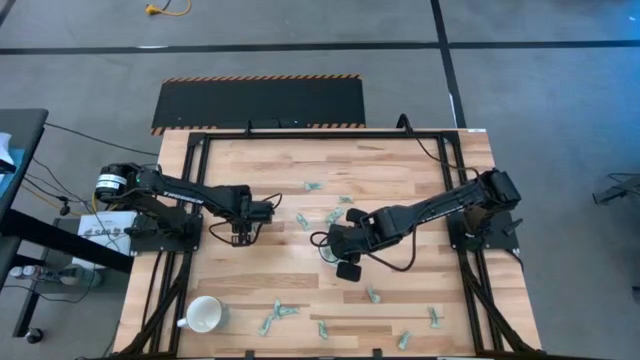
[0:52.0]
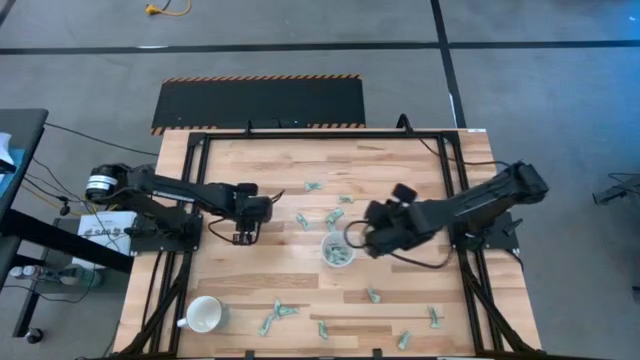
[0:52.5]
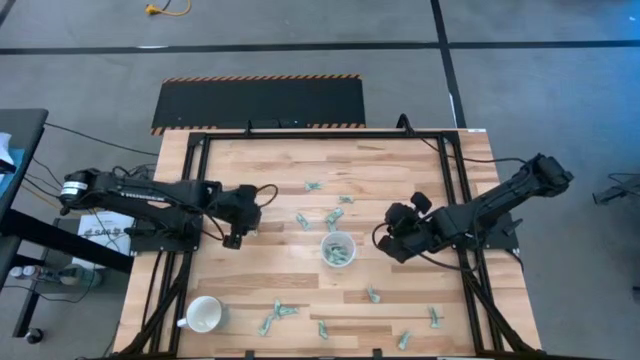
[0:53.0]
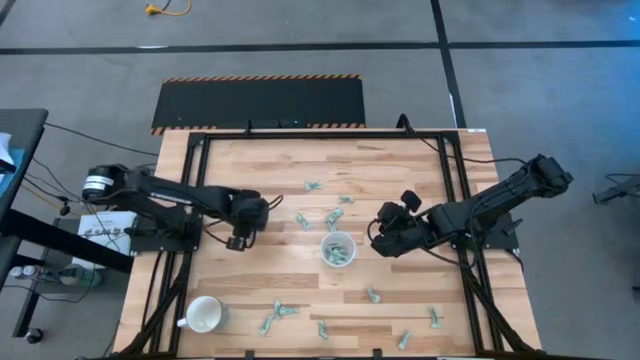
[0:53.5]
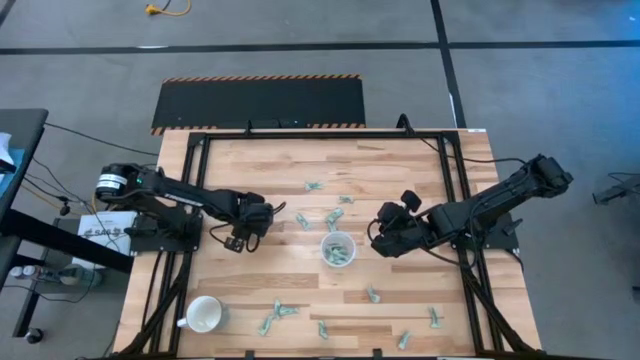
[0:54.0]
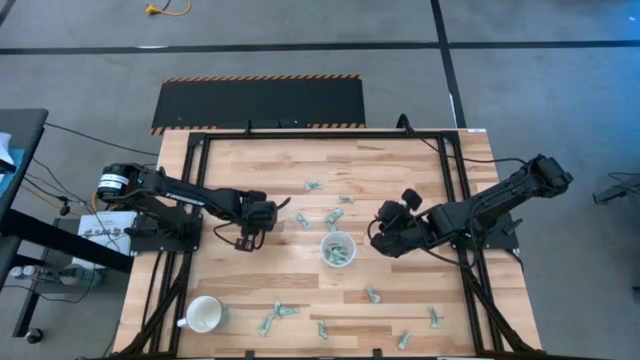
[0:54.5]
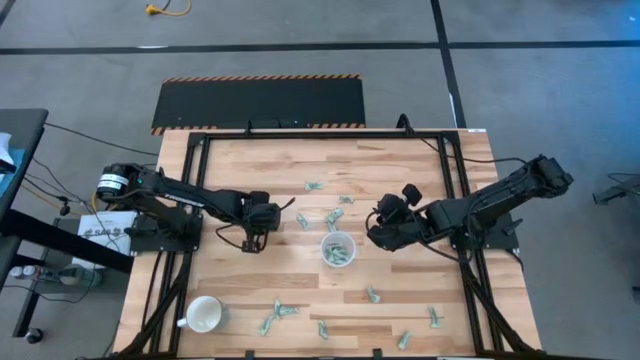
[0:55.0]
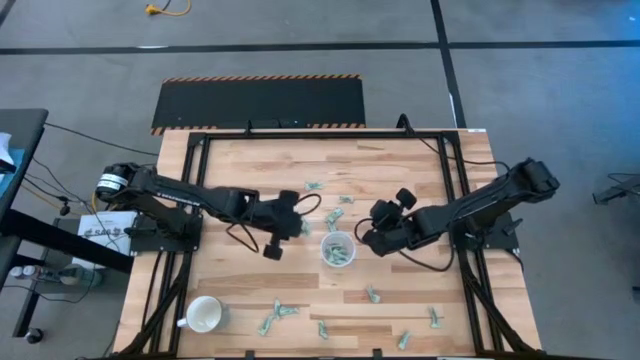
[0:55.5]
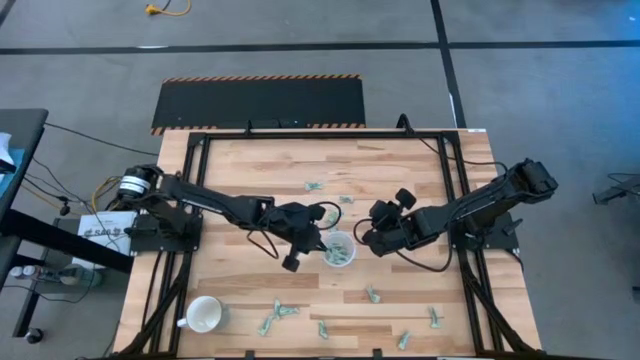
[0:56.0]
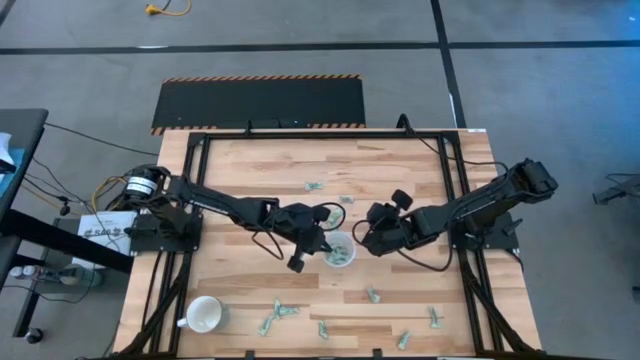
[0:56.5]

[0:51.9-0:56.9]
Task: Pick and place Stevia / Truvia into bins
Put the stevia packet into the transparent container

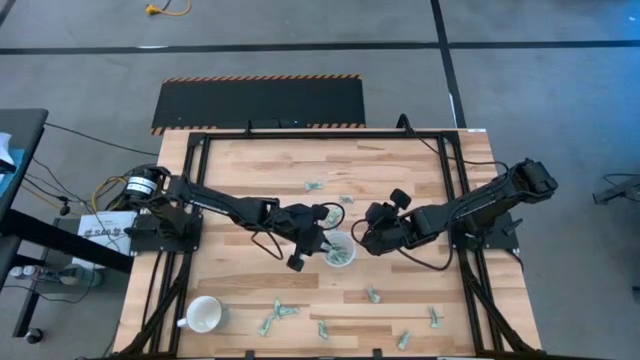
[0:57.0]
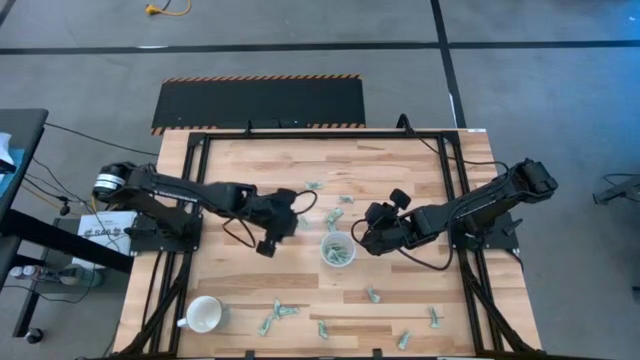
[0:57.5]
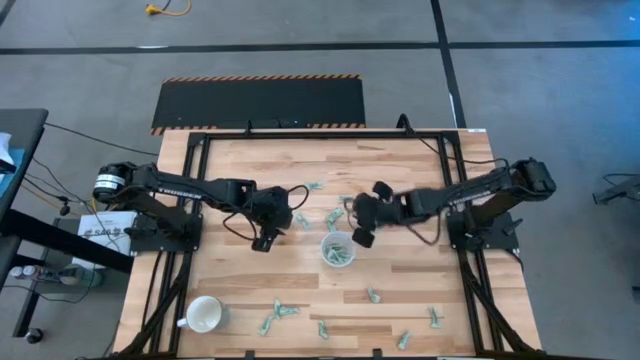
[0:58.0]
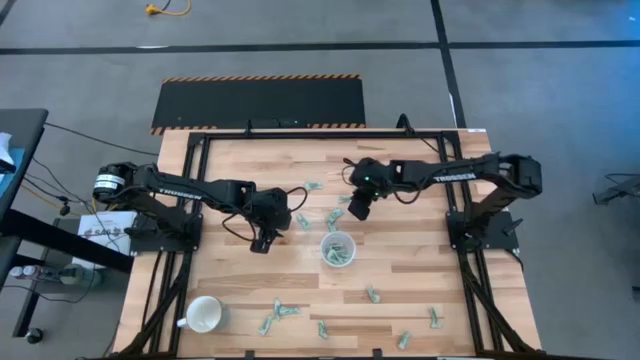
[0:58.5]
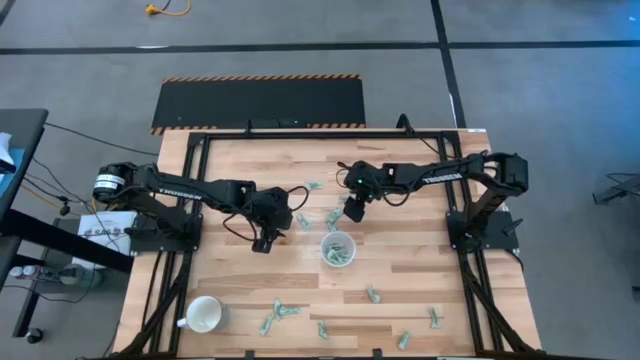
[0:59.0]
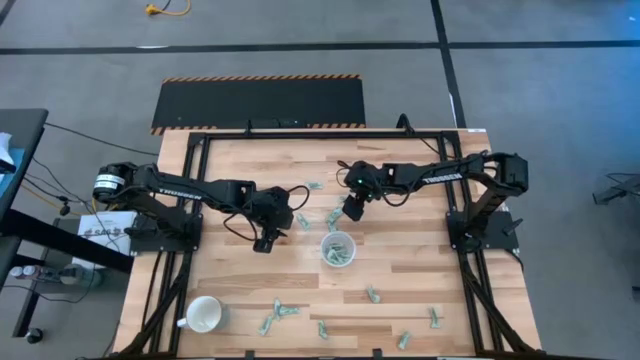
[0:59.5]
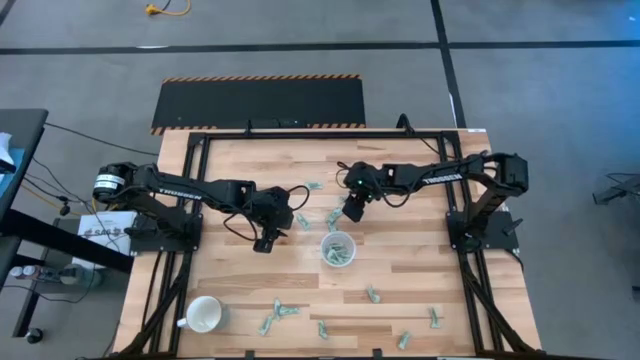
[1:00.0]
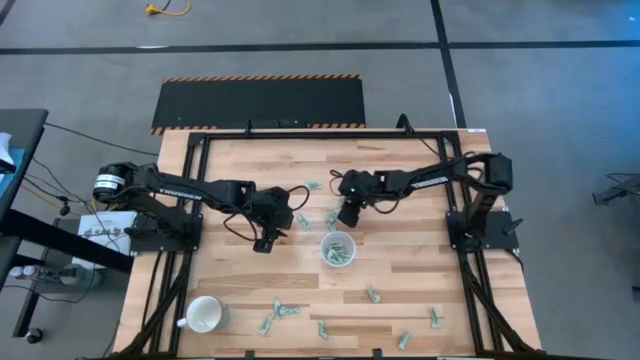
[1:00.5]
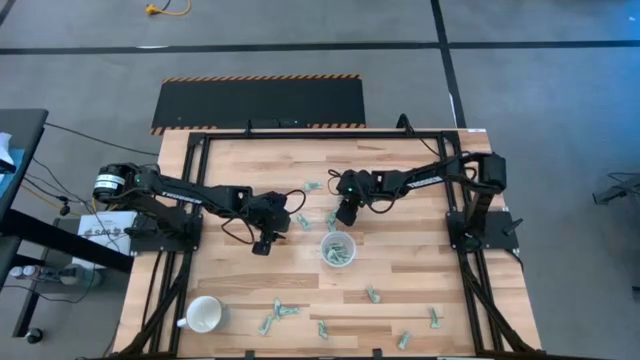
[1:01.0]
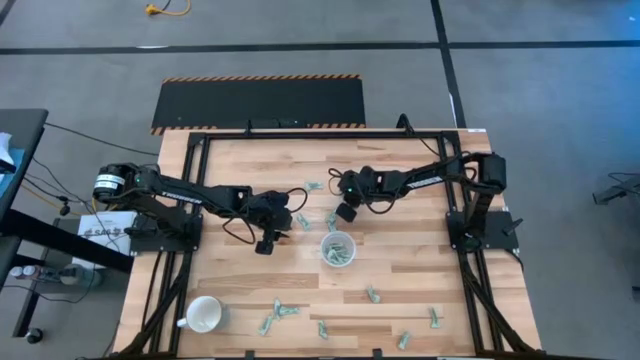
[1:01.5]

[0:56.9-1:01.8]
Put the stevia packet into the transparent container

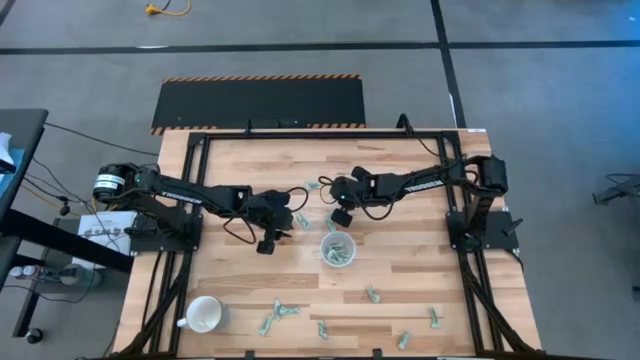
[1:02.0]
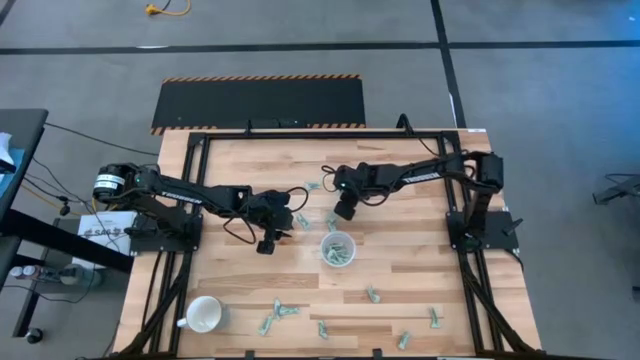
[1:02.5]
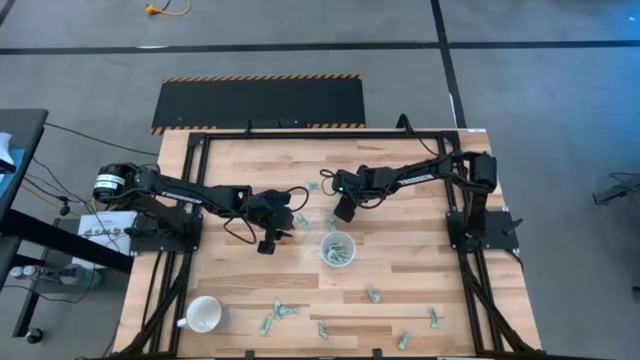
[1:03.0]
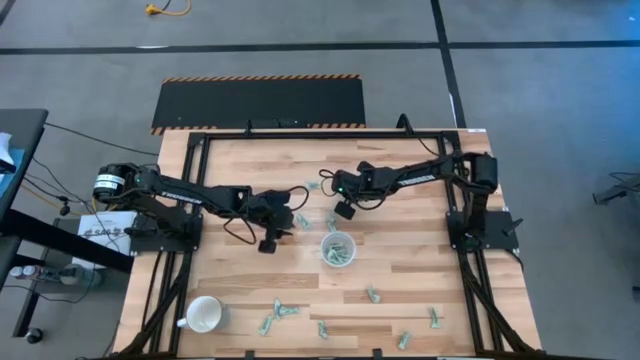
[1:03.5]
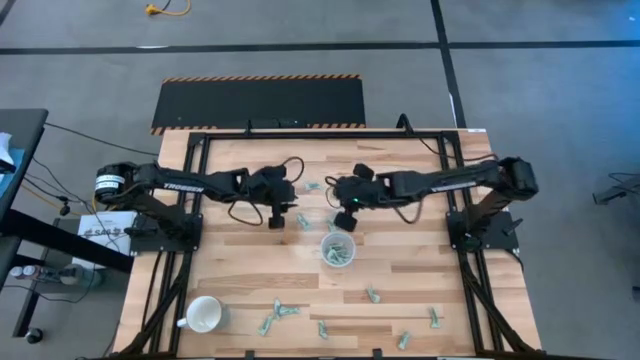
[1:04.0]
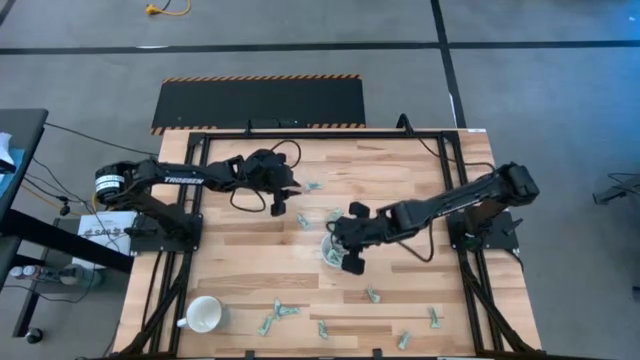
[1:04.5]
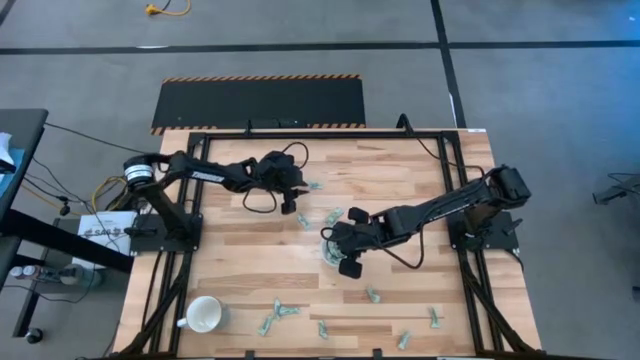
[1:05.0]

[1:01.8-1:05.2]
Put the stevia packet into the transparent container

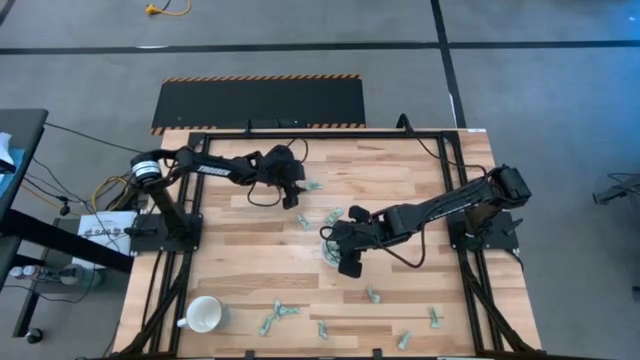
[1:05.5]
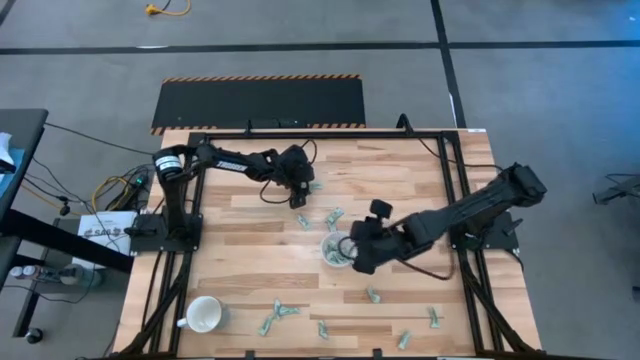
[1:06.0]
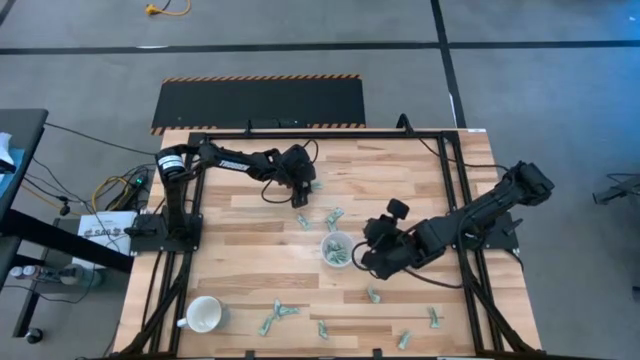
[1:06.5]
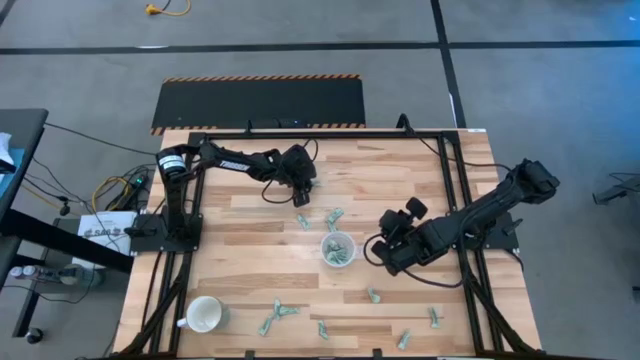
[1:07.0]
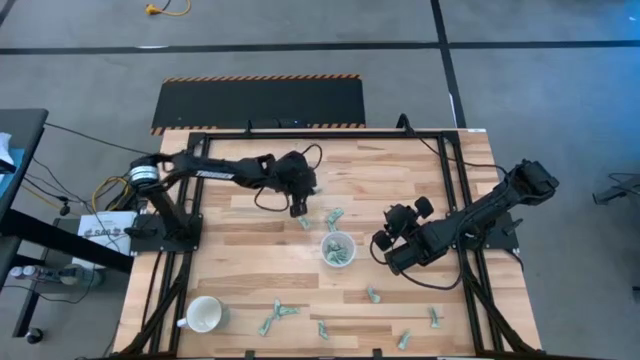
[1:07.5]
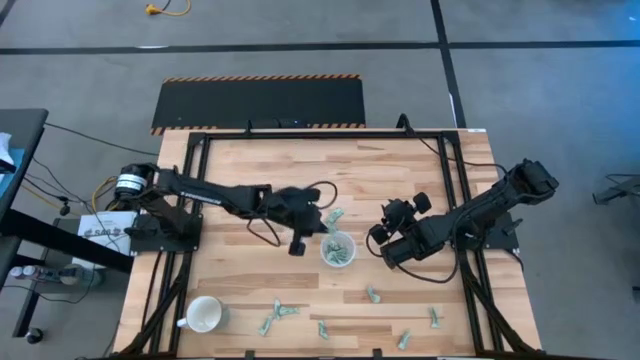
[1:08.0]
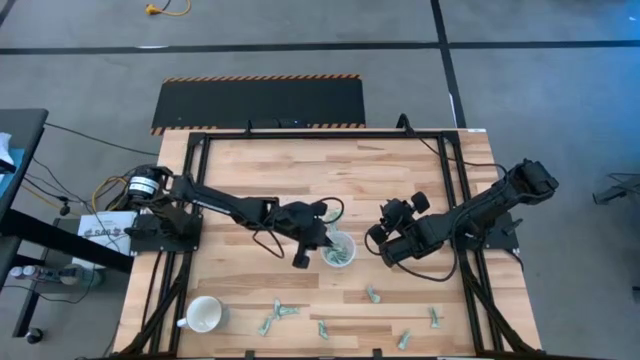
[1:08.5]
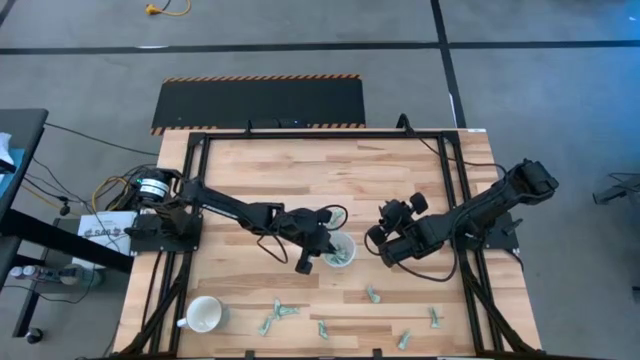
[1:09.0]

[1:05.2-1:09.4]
Put the stevia packet into the transparent container

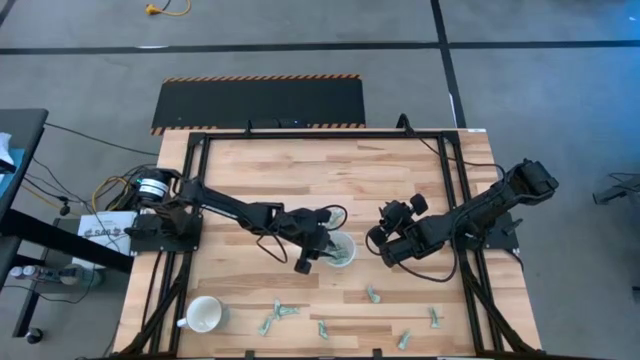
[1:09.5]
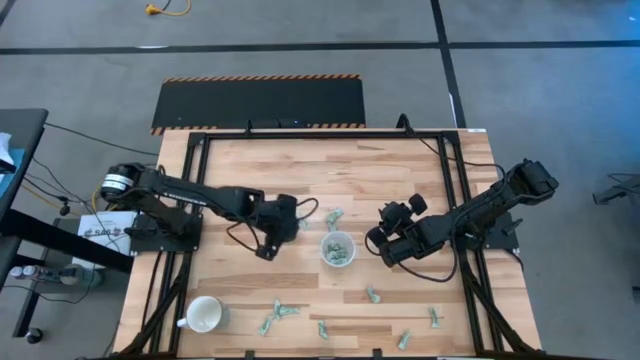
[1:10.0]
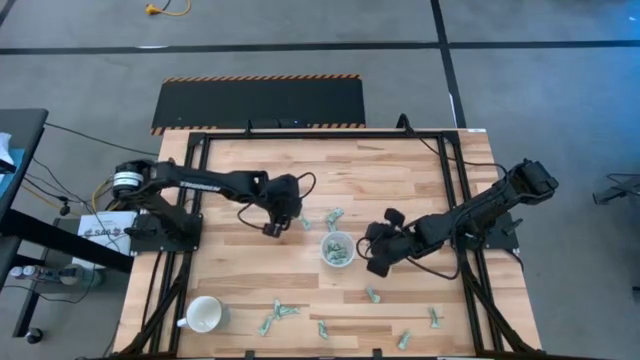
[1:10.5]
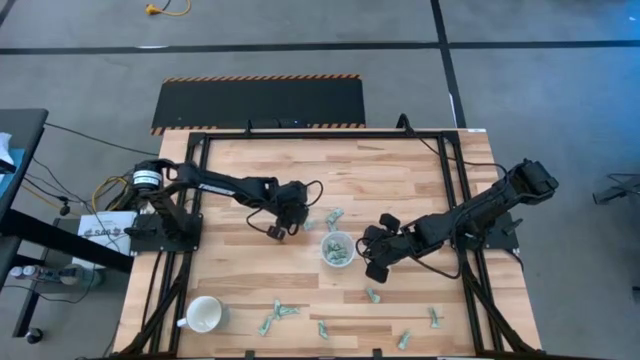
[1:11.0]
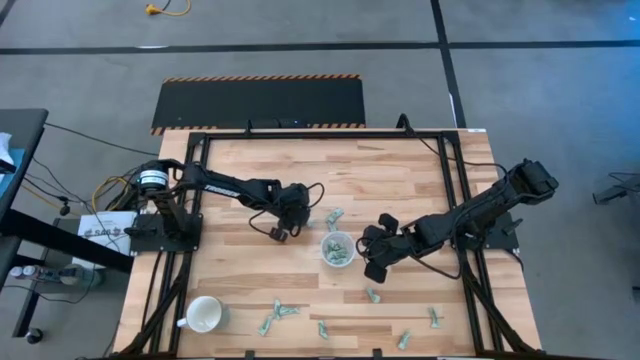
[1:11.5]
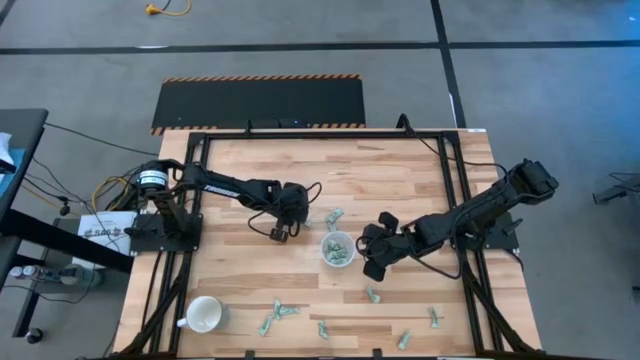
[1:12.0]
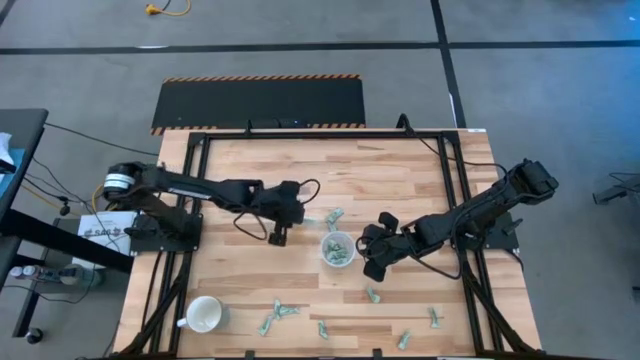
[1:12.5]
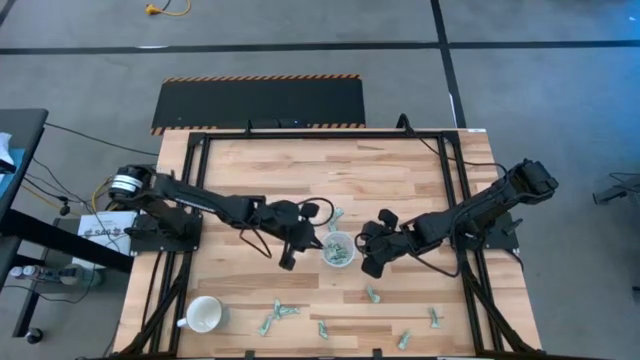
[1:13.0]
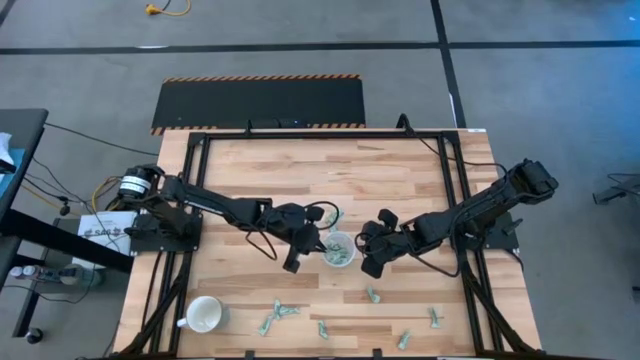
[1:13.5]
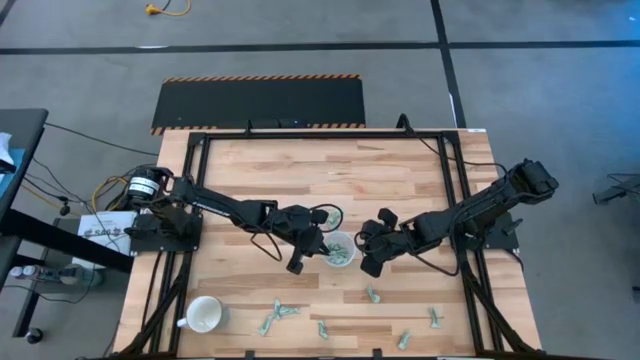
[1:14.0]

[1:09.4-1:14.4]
Put the stevia packet into the transparent container
